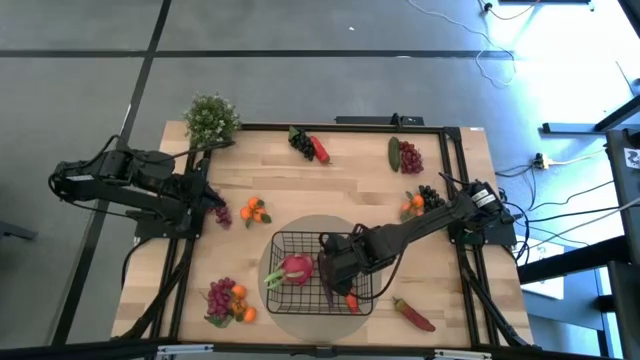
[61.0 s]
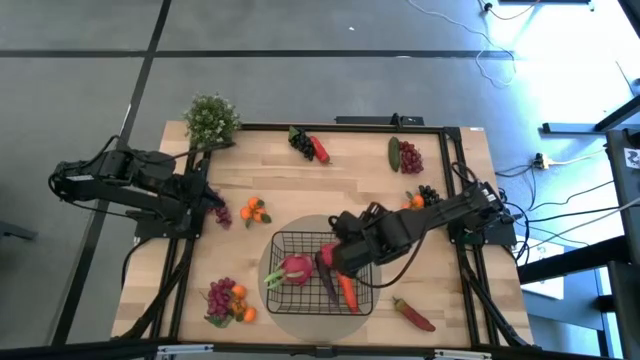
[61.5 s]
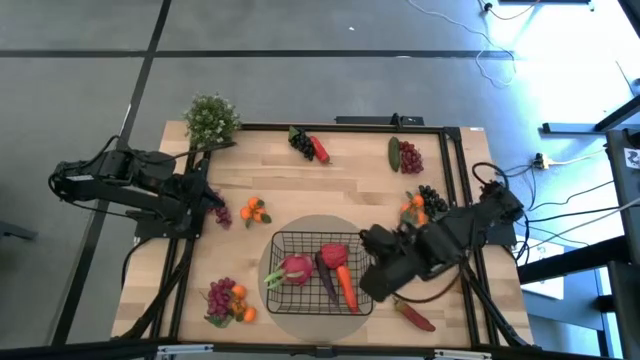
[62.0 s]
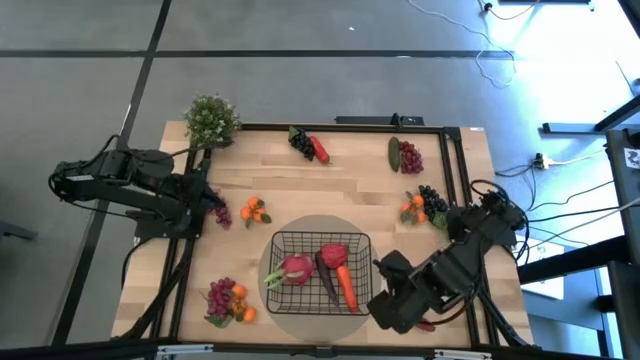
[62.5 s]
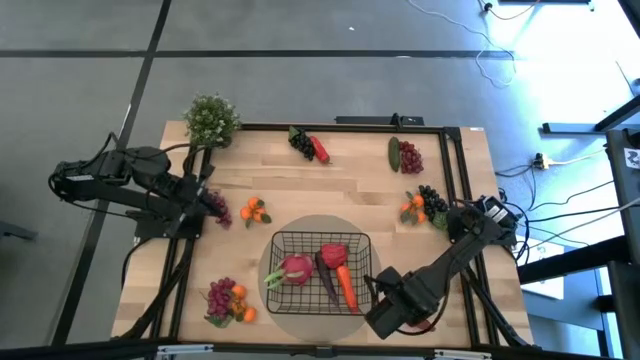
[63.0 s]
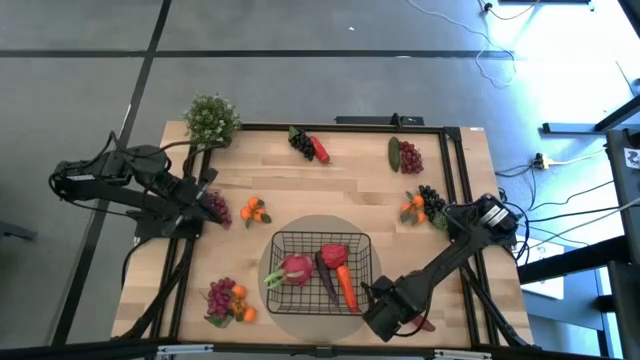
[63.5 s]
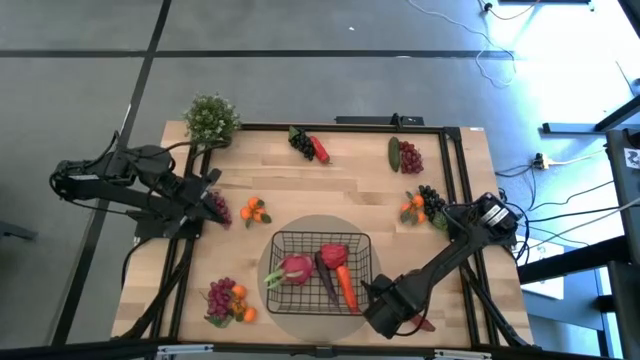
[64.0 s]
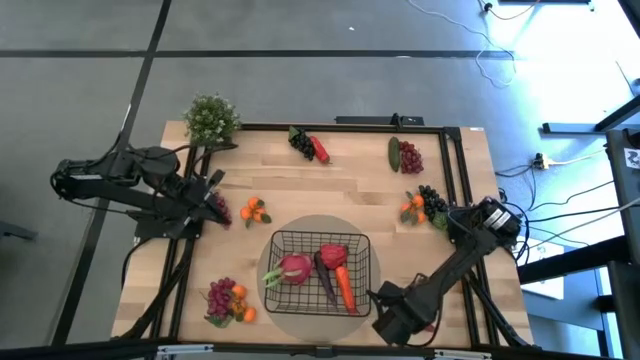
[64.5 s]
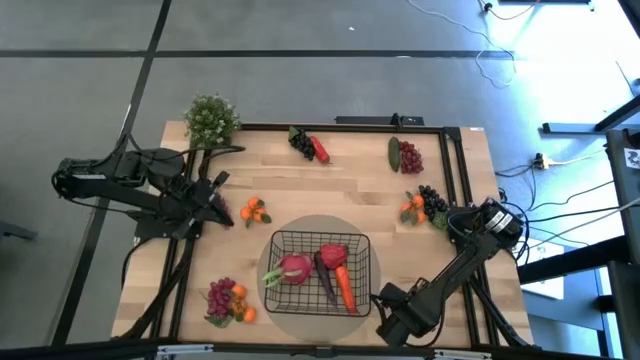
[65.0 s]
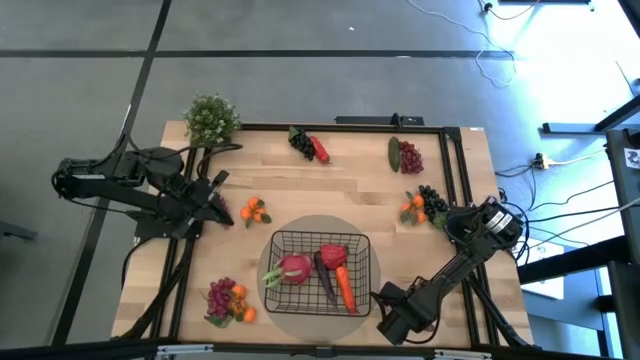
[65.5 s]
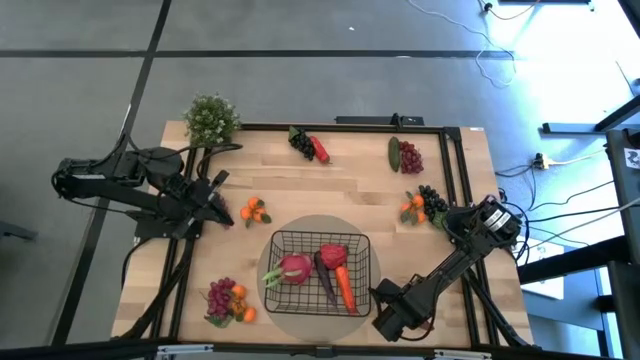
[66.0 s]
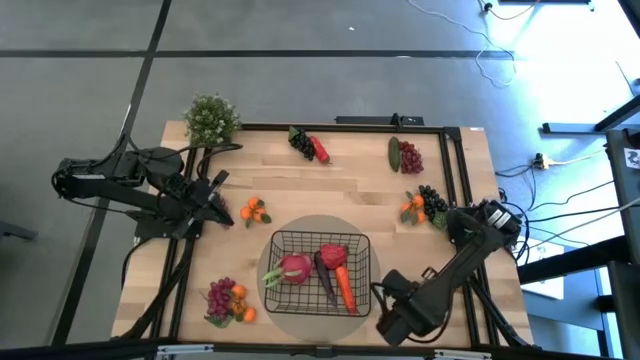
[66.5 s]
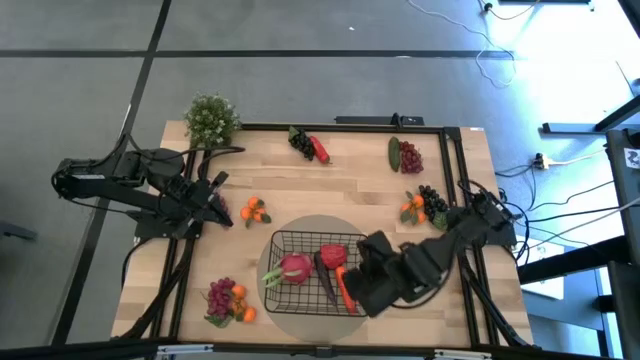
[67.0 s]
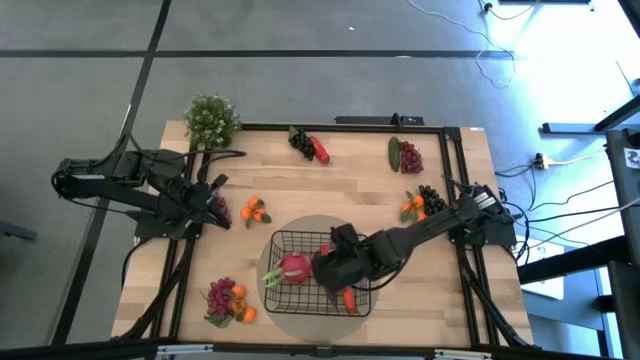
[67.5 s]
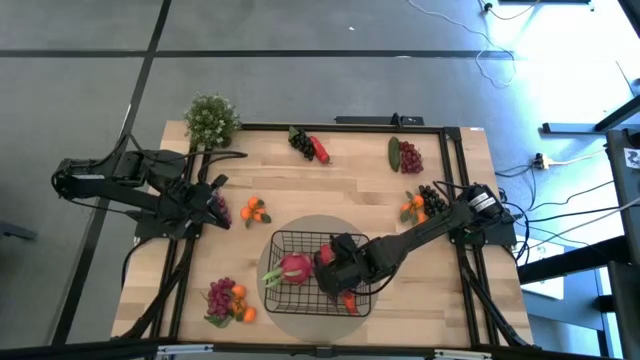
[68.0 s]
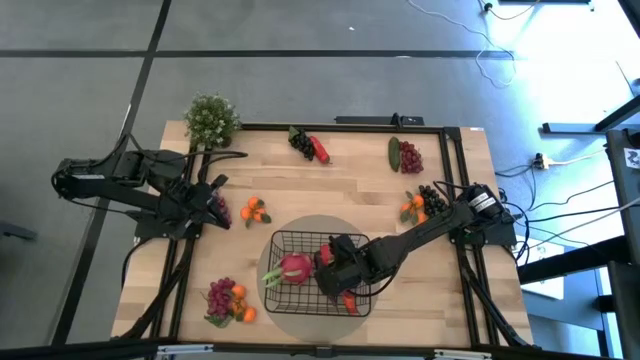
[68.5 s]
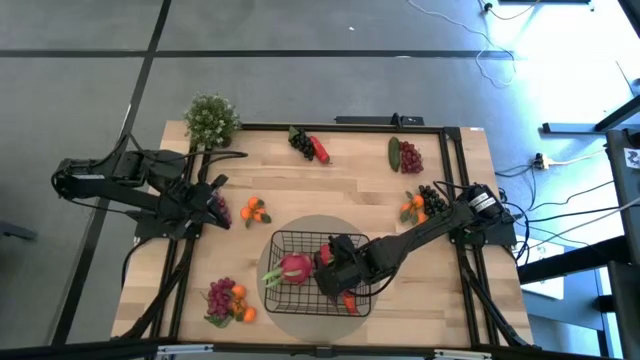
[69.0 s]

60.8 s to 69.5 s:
Task: Build produce basket
Put the bottom chili pepper into the black wire basket

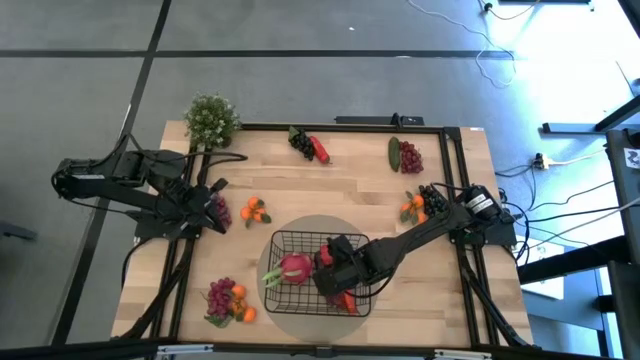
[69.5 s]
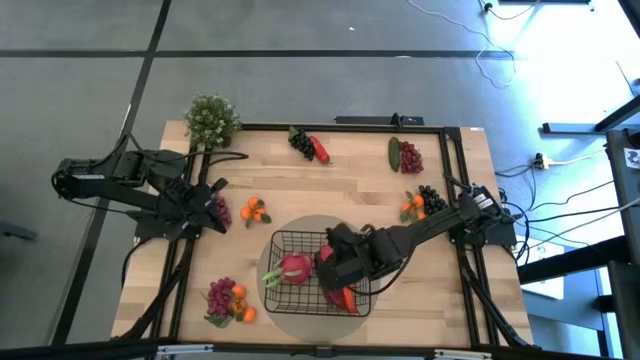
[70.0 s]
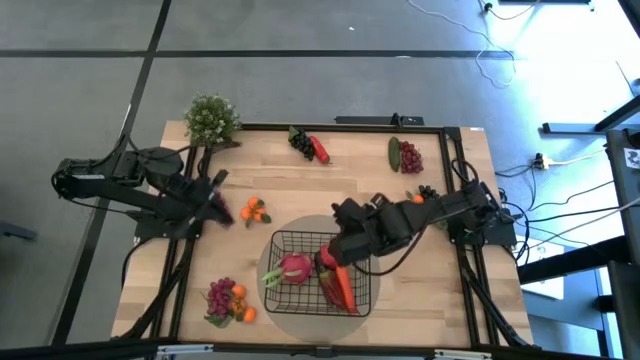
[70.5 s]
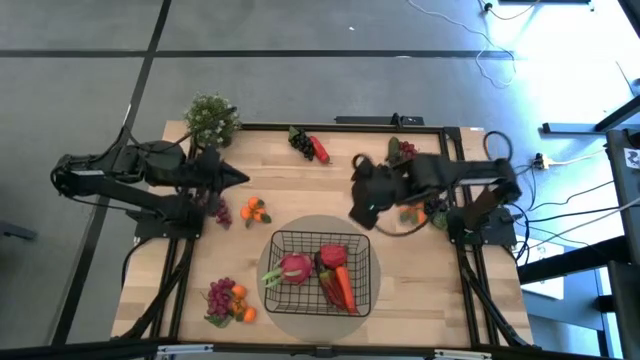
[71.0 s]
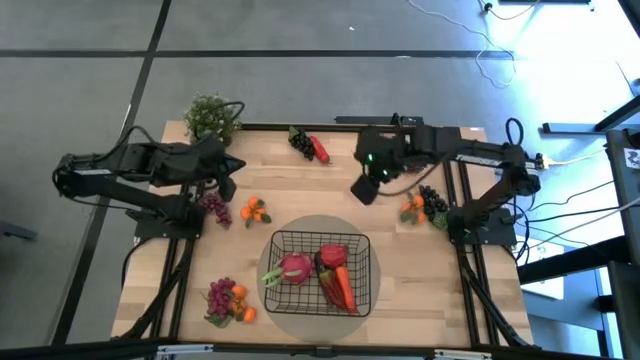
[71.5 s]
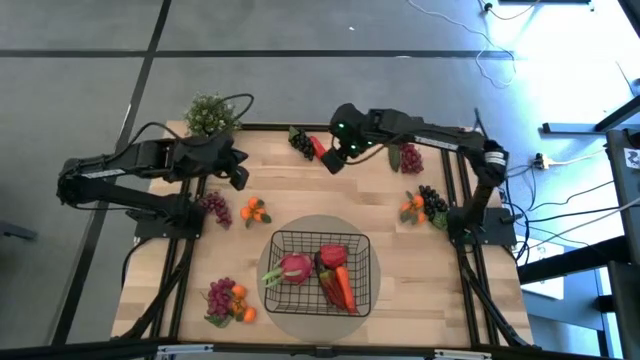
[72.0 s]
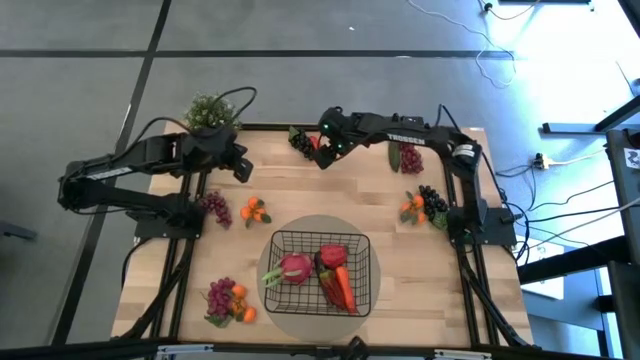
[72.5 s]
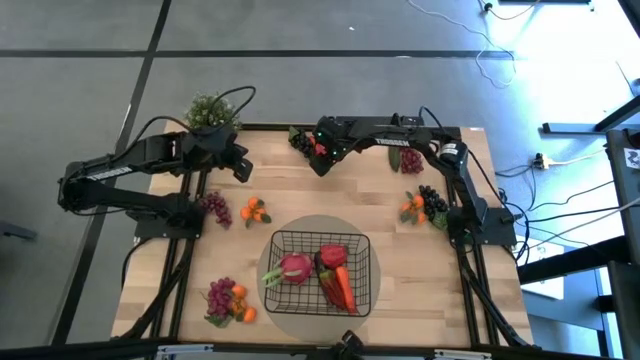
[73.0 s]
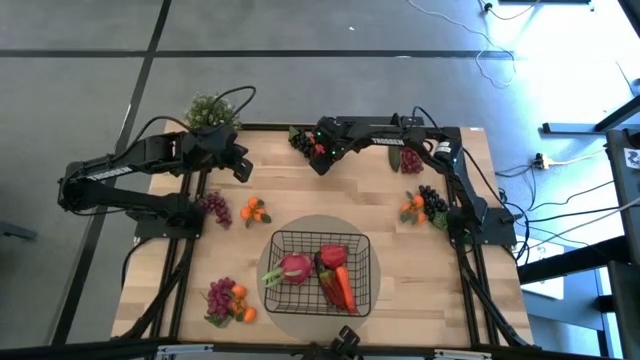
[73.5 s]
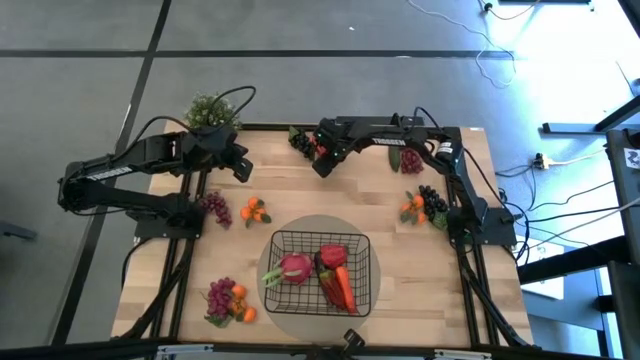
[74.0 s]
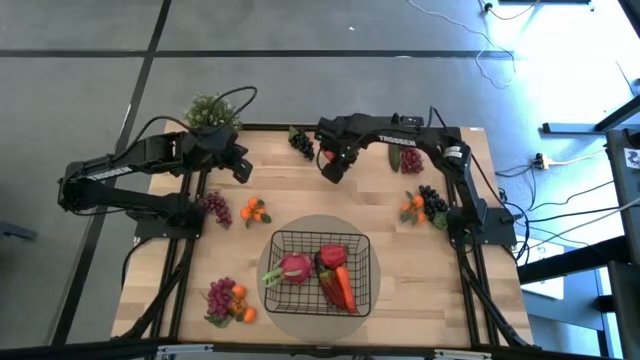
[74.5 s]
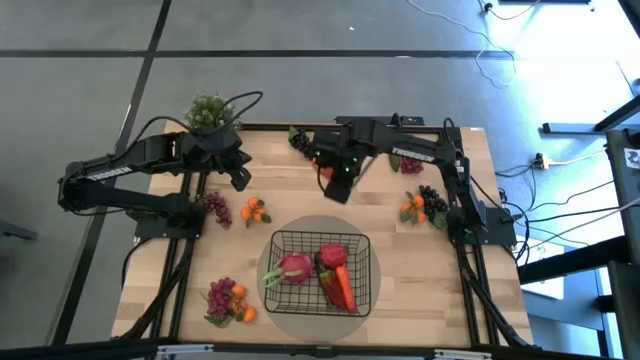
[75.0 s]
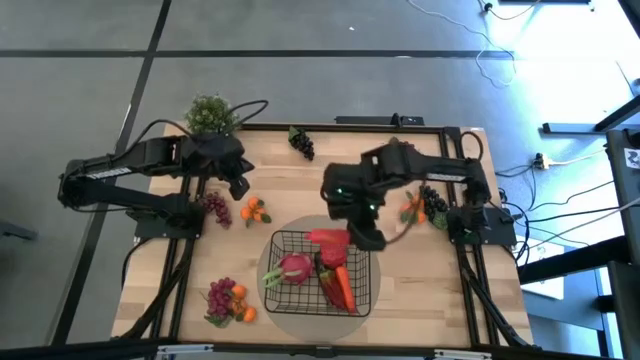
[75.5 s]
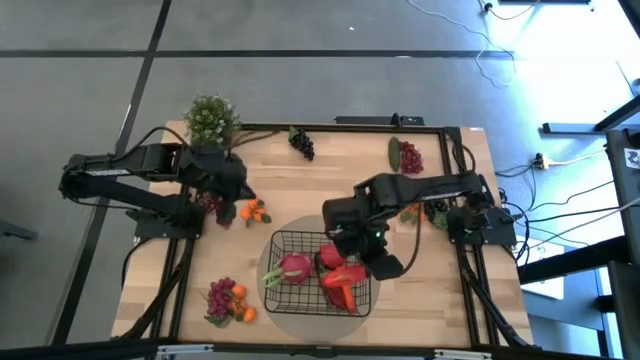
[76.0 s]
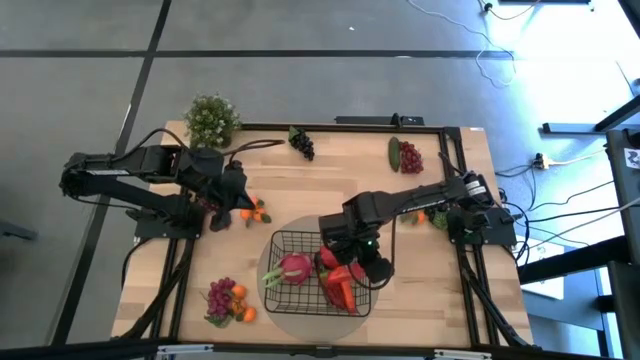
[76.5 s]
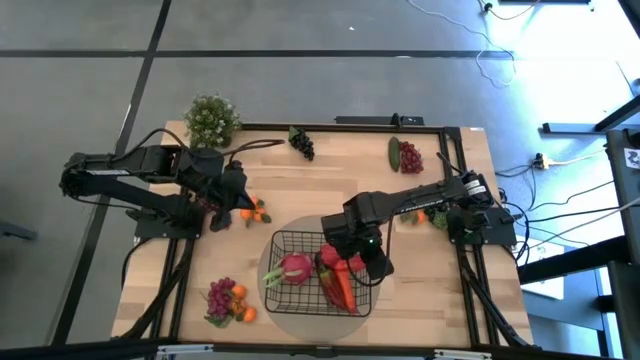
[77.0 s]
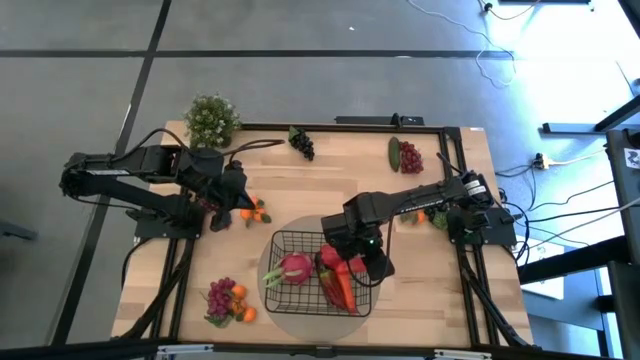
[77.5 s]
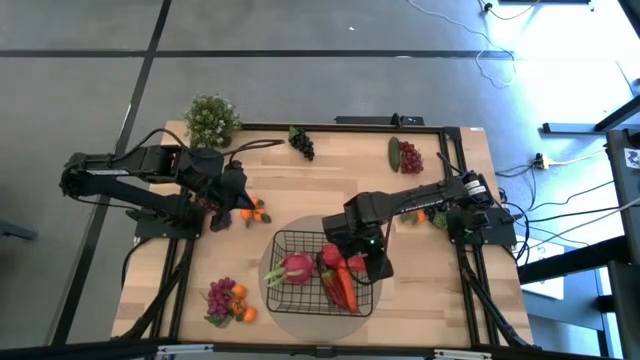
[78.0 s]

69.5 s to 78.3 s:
Put the red chili pepper into the black wire basket

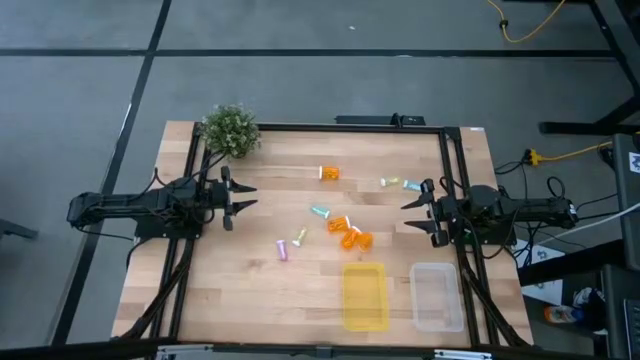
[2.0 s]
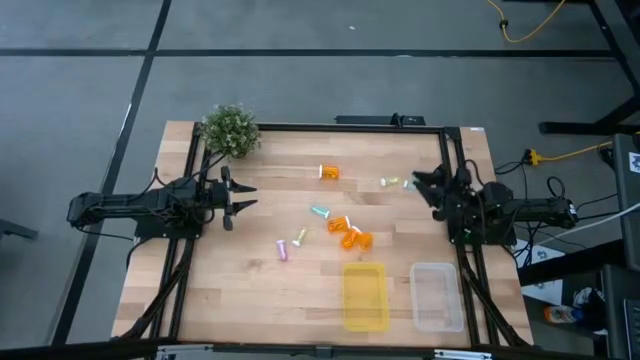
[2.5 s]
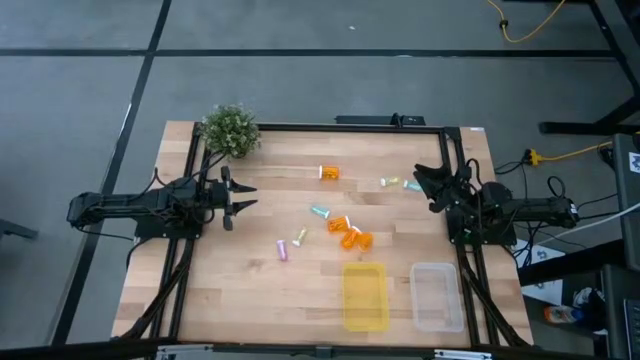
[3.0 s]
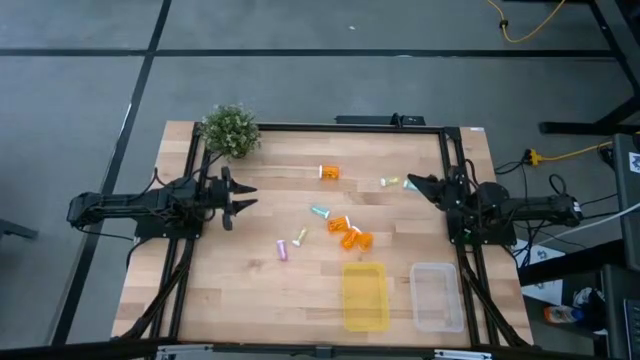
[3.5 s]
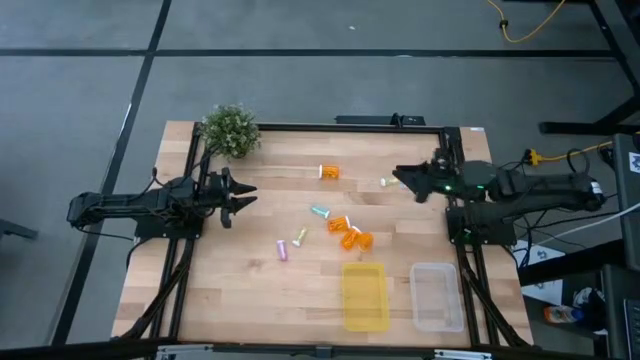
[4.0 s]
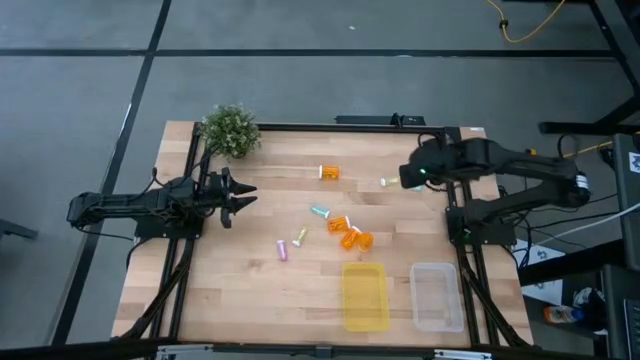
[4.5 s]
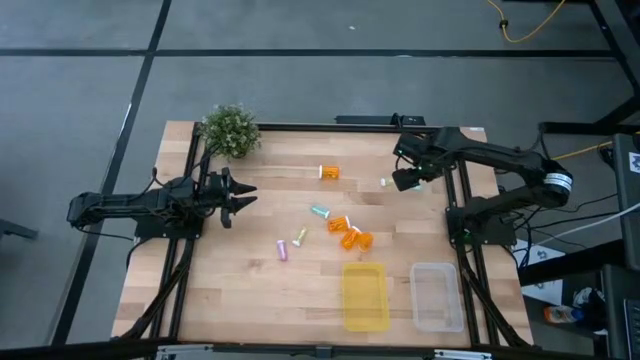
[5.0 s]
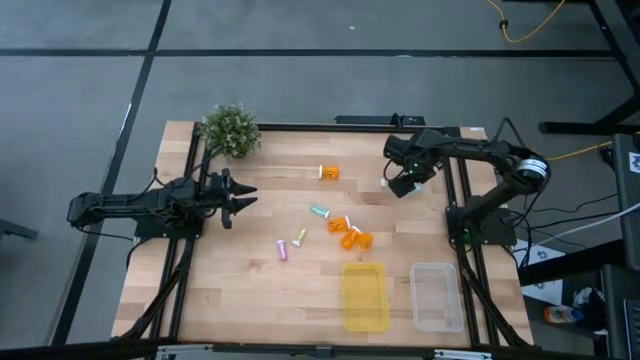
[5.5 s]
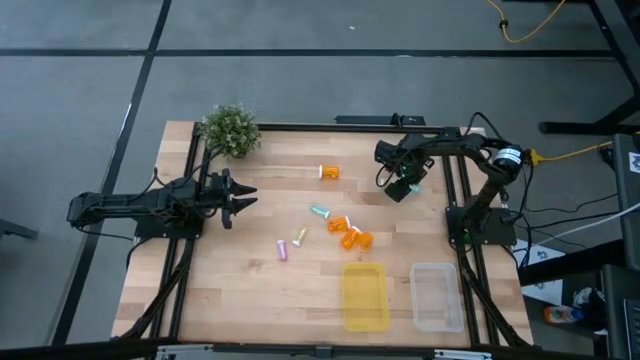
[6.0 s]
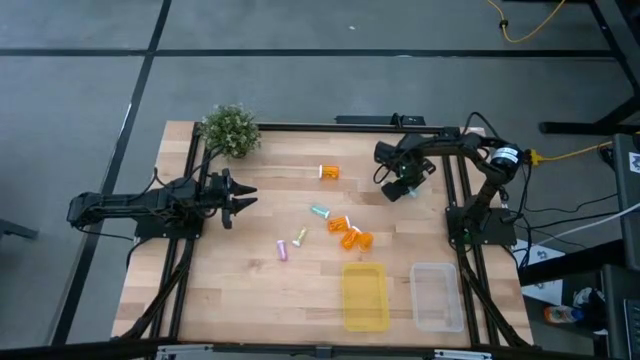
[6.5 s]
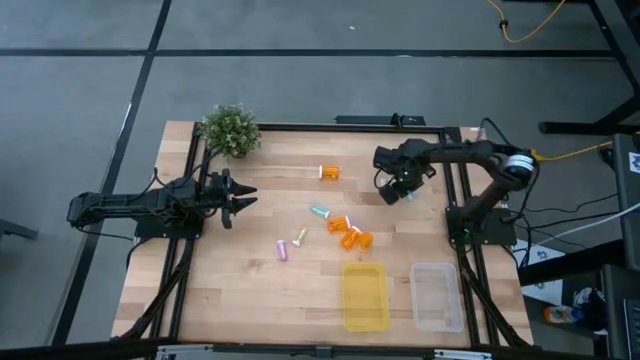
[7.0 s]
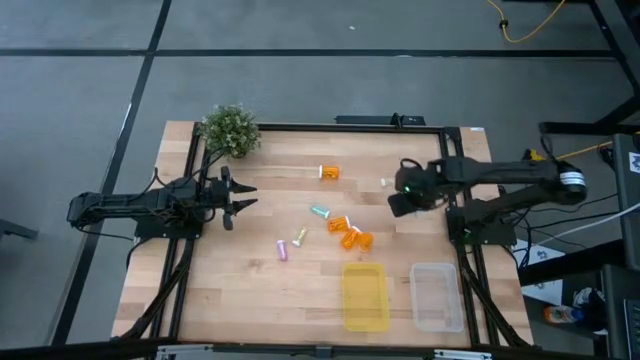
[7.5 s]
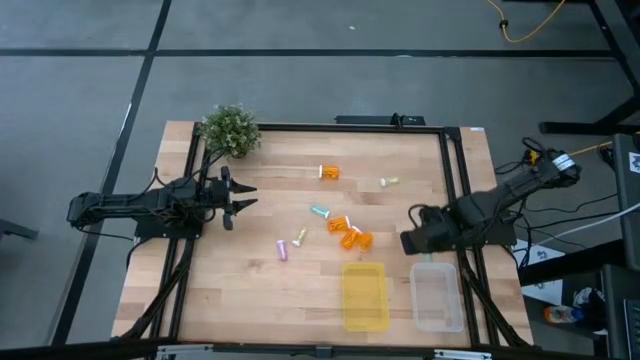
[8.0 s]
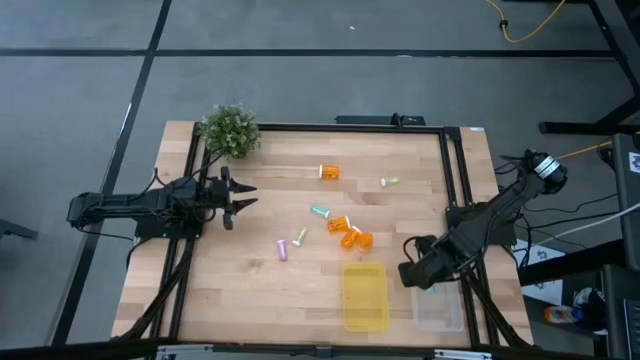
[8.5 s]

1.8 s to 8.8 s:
Task: Pick and place medicine bottles into bin by pill shape (circle, oval)
Put the blue tablet bottle into the transparent bin
